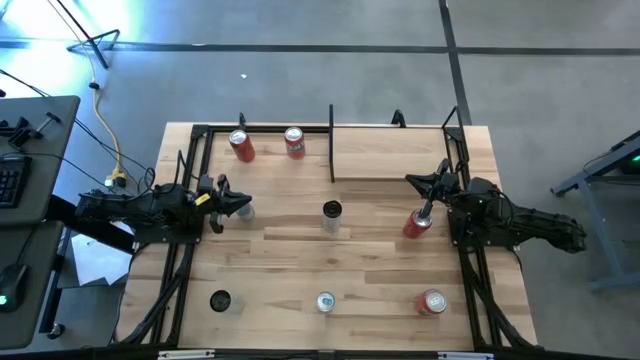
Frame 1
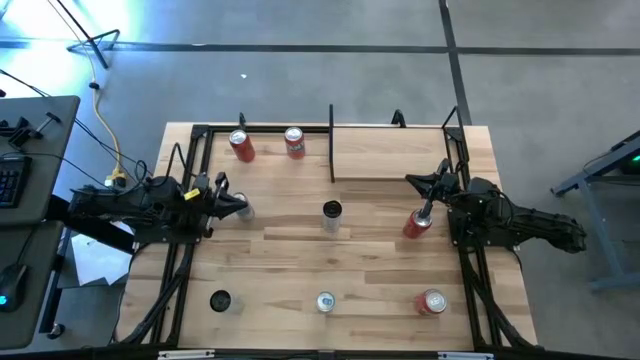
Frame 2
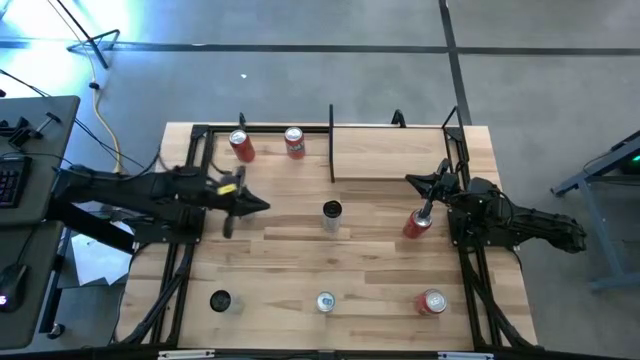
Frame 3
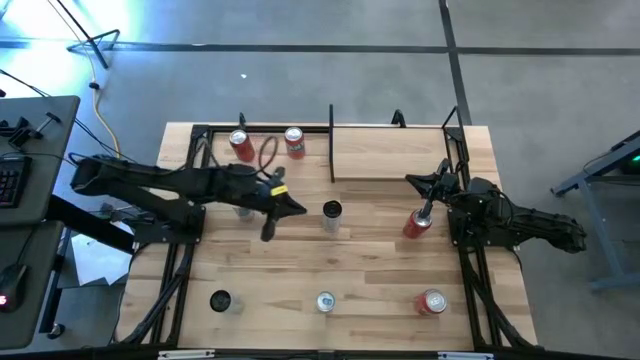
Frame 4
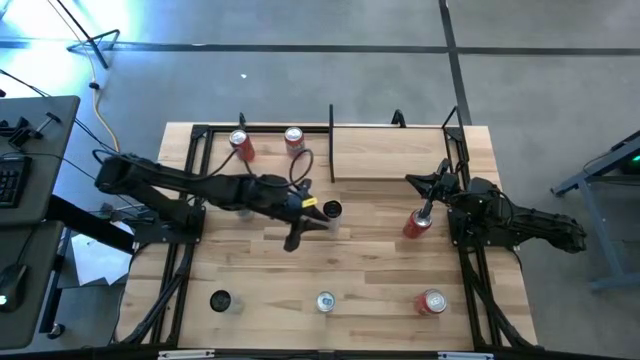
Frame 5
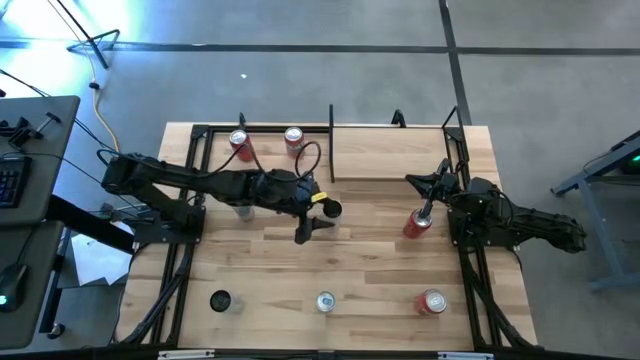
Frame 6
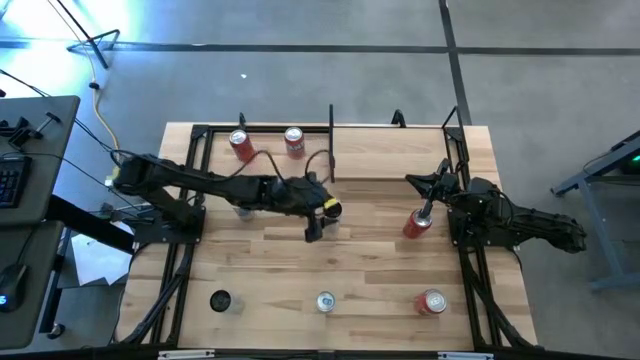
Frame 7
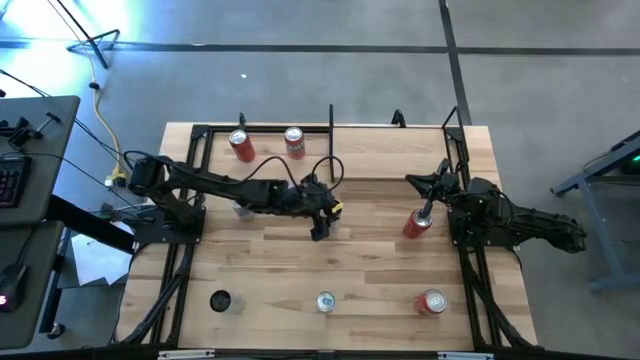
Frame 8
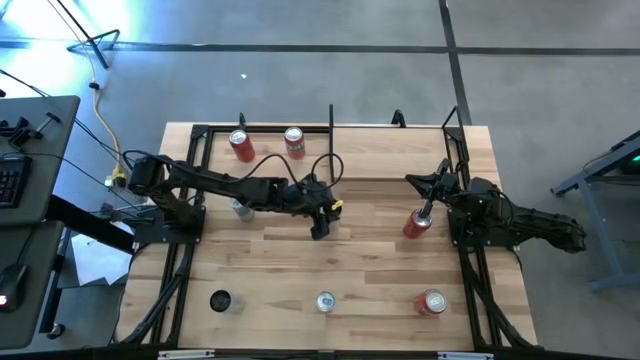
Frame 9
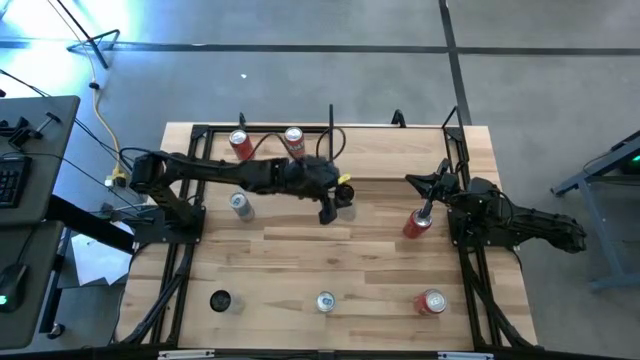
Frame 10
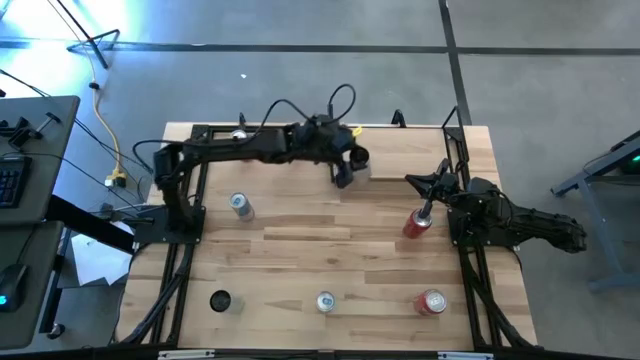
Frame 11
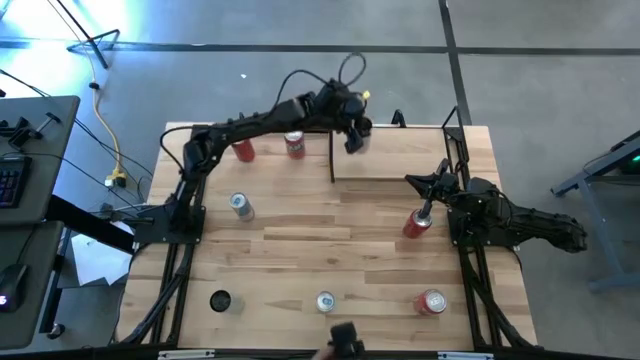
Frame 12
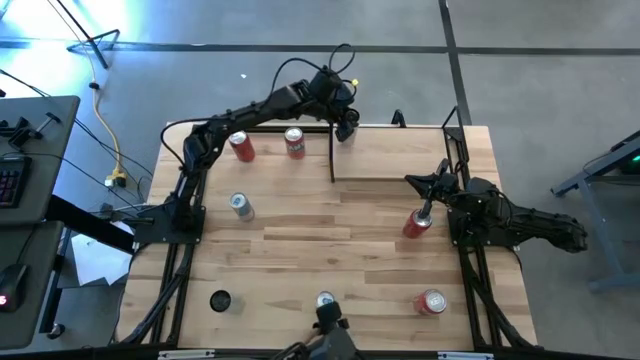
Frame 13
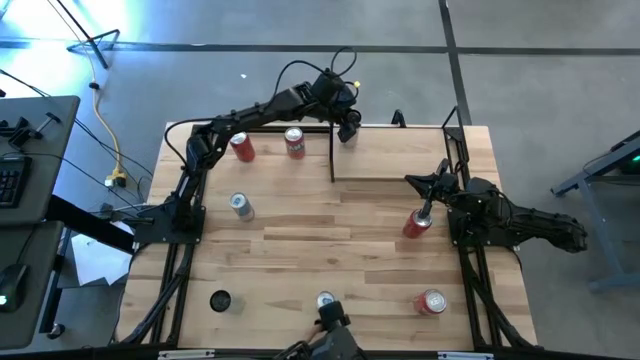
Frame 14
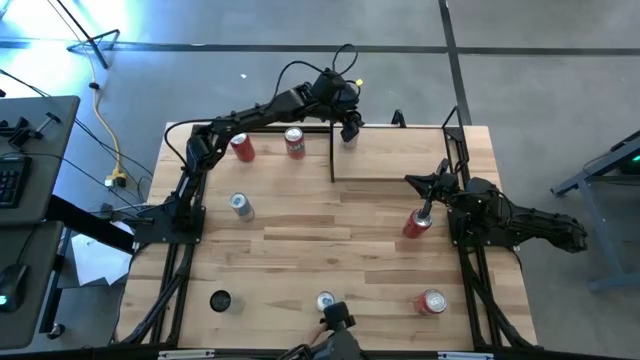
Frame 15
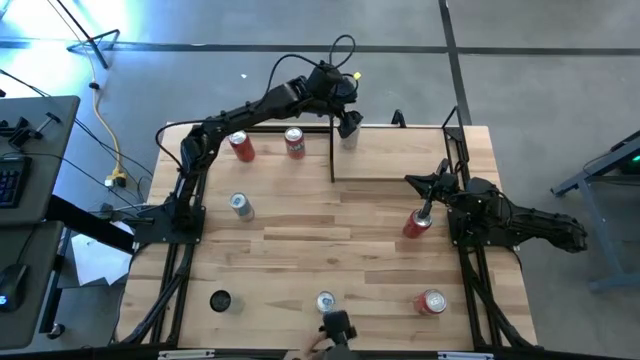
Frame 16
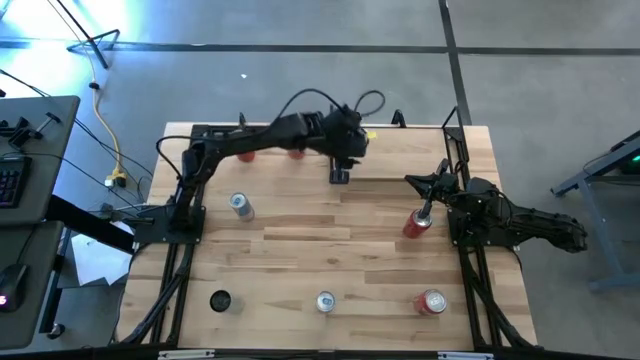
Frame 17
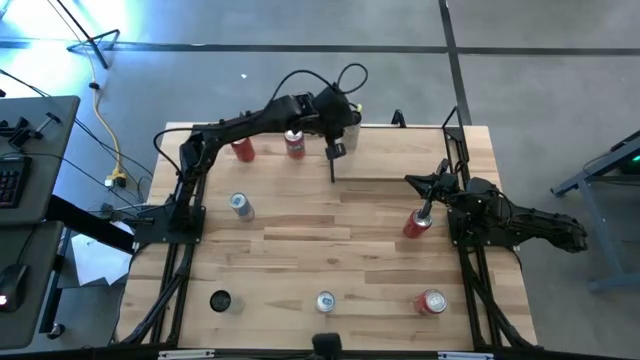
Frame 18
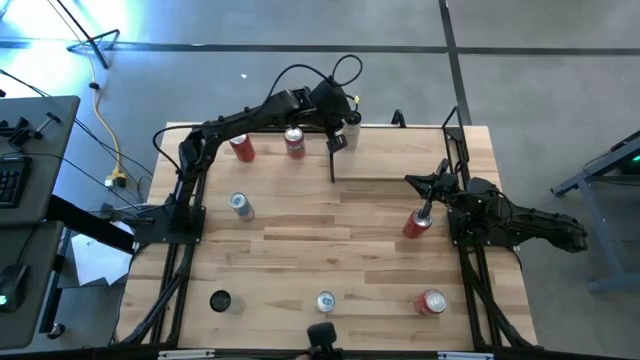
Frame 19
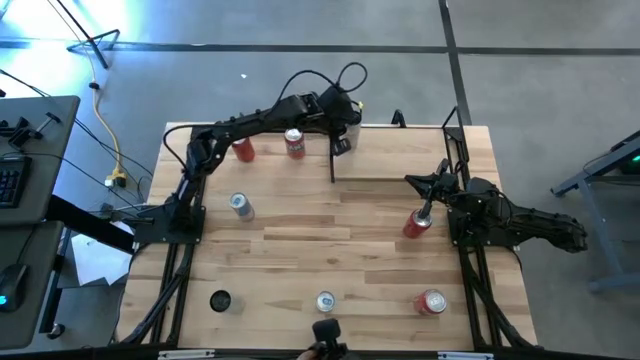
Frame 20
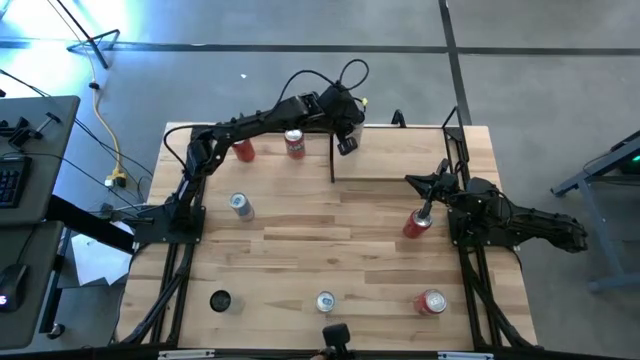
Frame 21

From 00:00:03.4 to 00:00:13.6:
Task: Place canned beverage on shelf
Put the top white soda can on the shelf

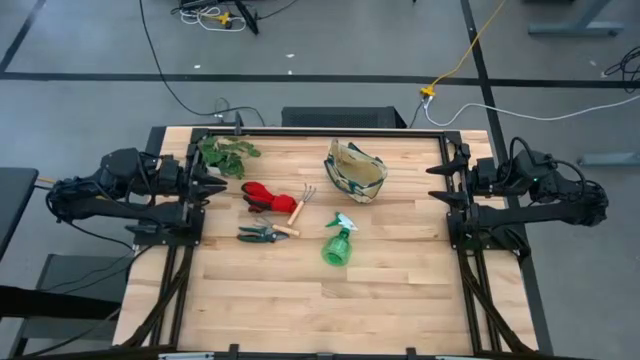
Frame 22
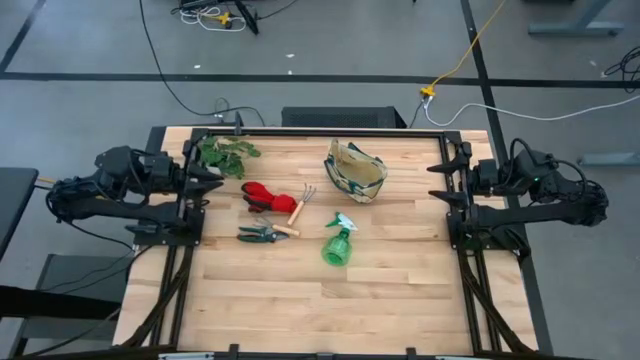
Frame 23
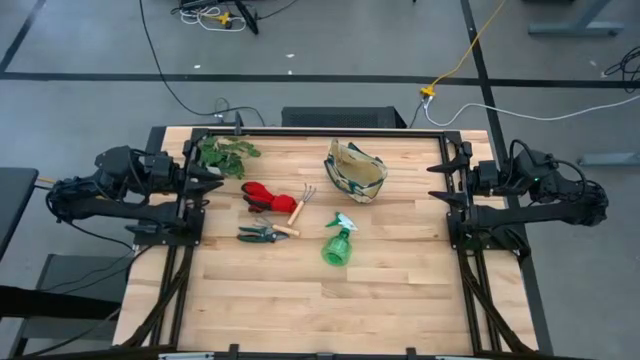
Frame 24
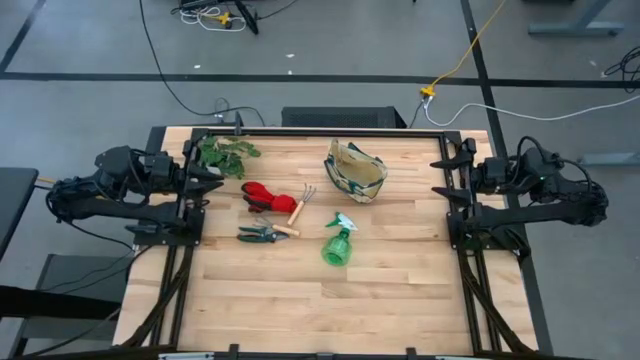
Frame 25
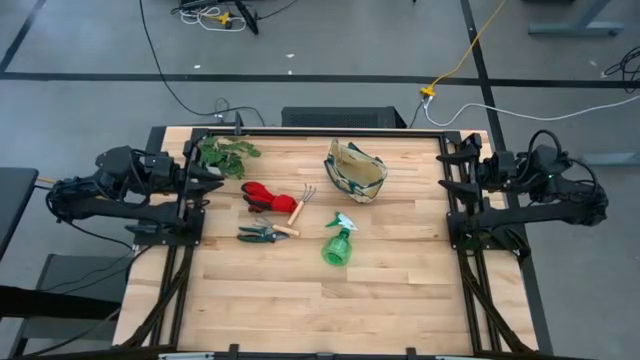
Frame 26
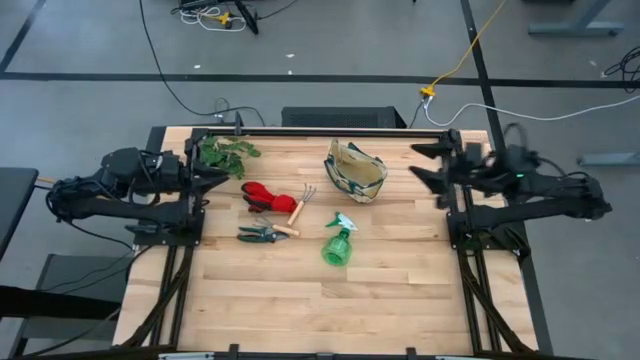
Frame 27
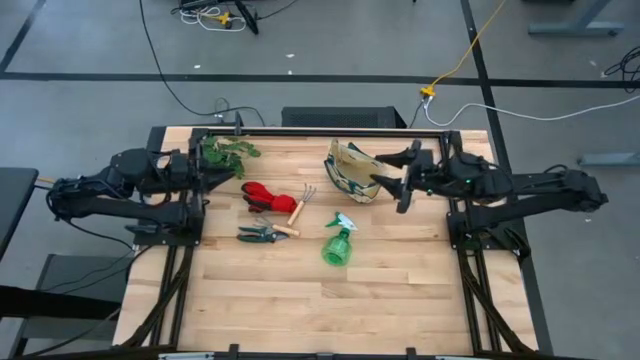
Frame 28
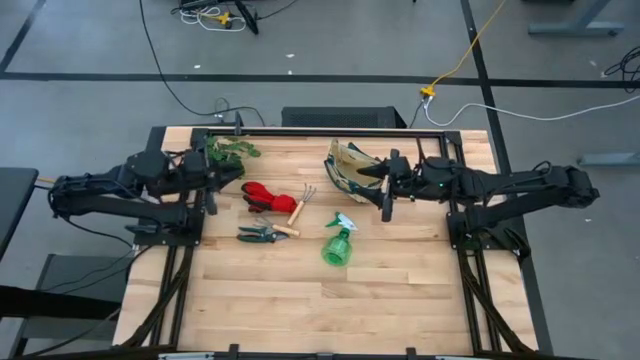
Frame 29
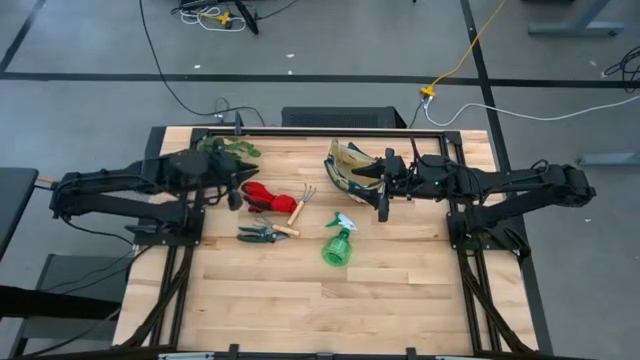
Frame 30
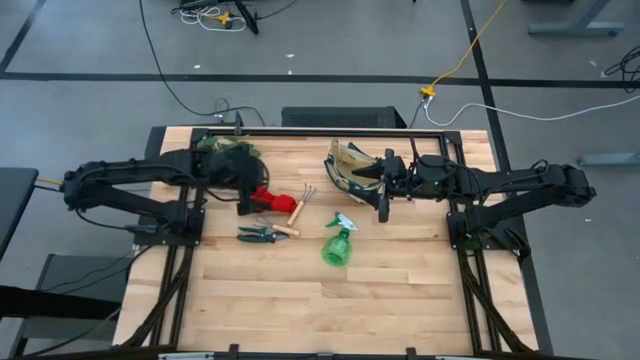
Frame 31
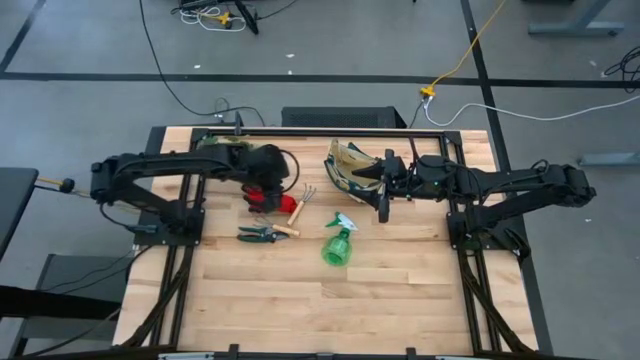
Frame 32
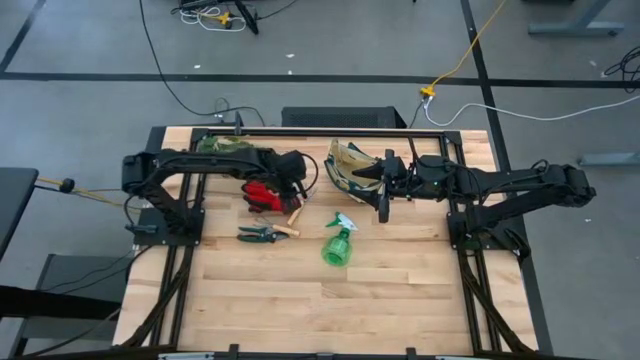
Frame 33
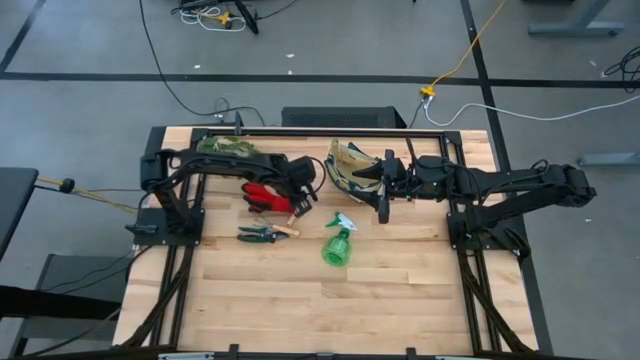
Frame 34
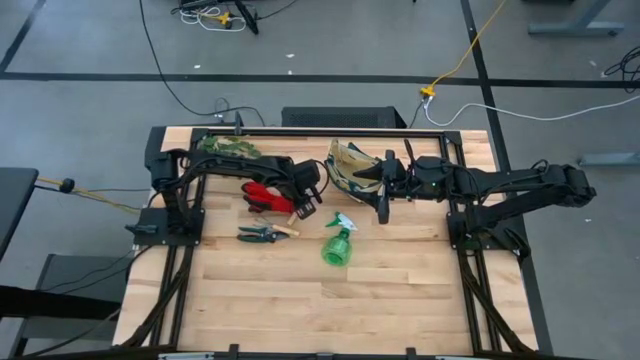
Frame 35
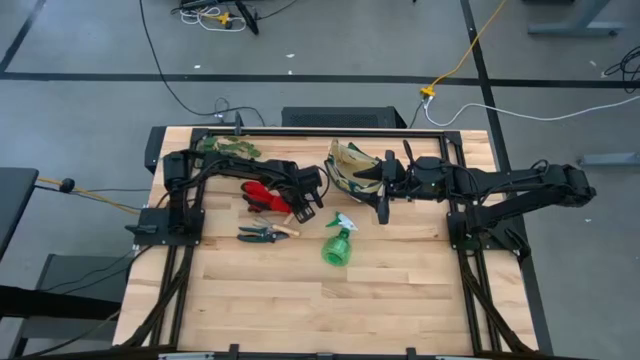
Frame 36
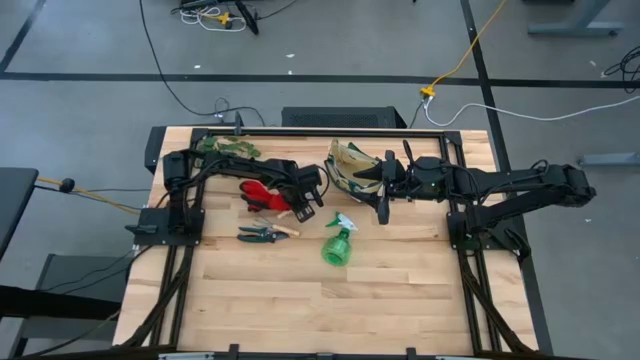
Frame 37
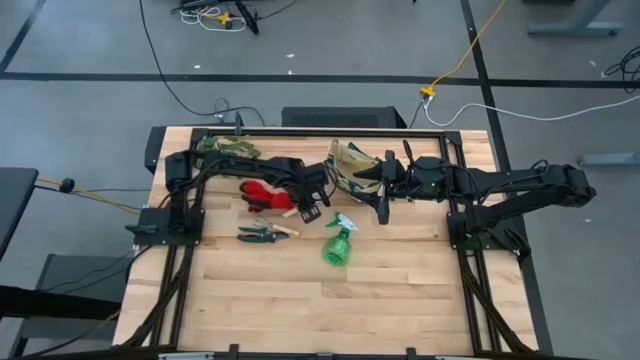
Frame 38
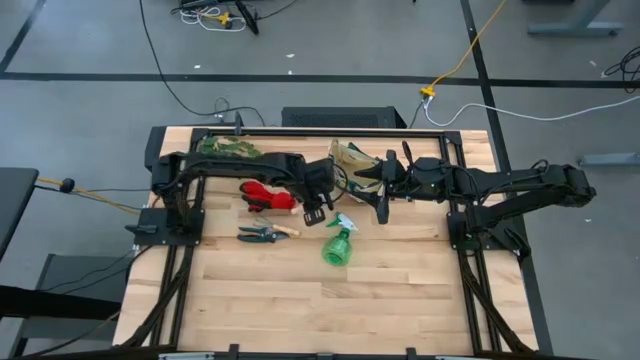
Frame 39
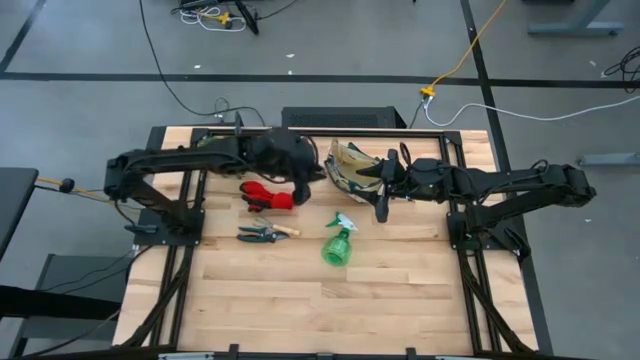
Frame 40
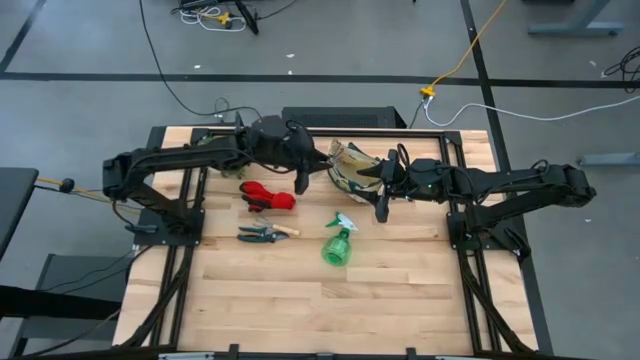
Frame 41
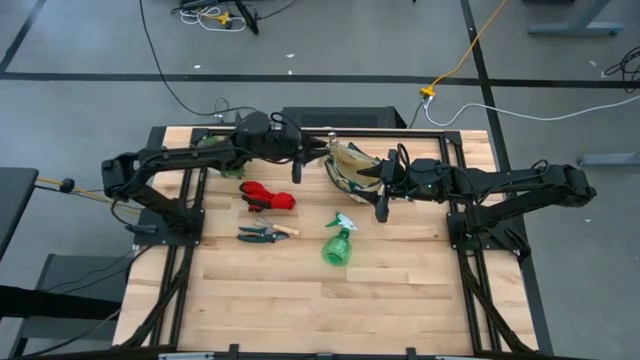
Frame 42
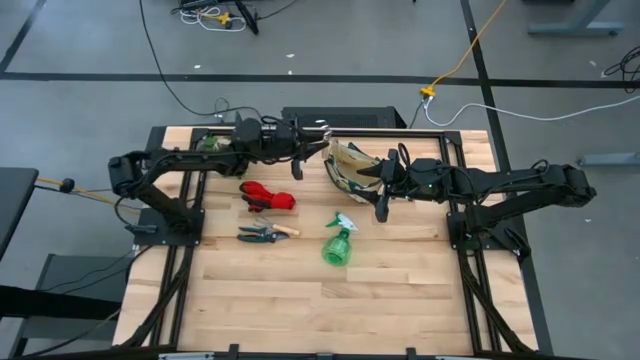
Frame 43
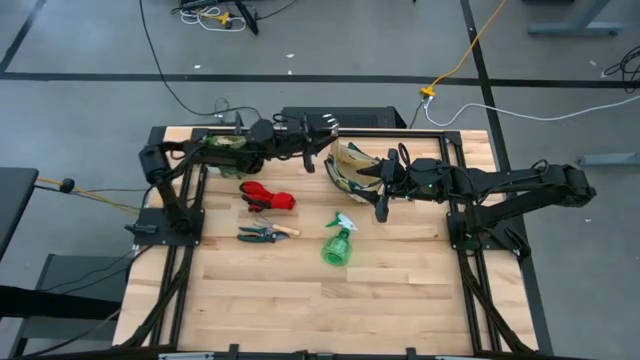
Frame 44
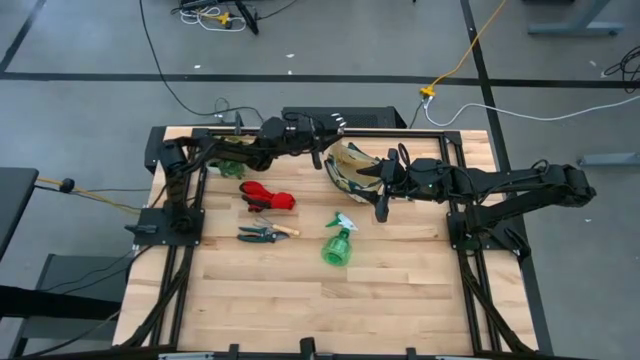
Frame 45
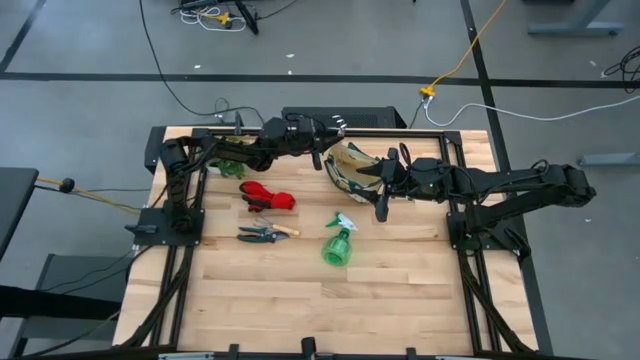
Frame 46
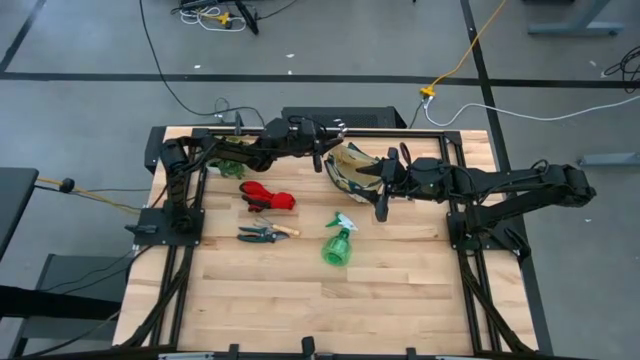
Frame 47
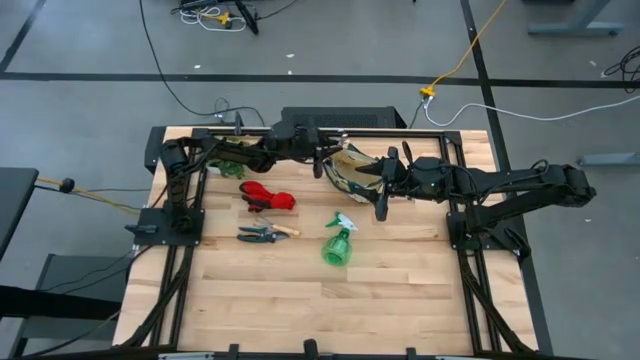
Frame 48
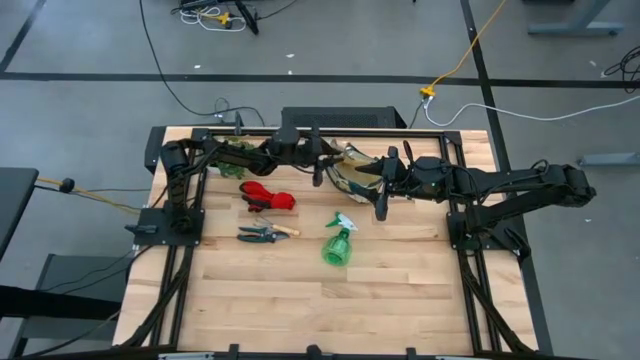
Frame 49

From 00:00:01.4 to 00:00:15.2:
Task: Pick & Place Garden tools in Gardening bag
Put the top brown hand rake into the patterned white gardening bag
